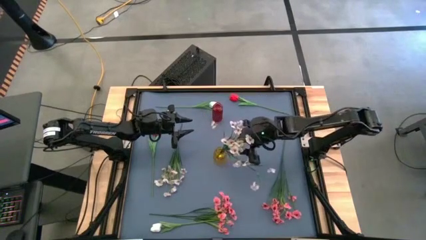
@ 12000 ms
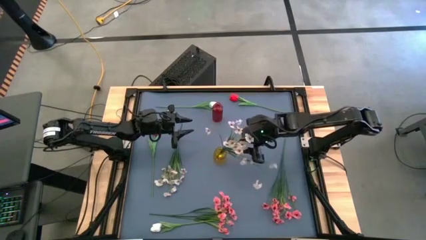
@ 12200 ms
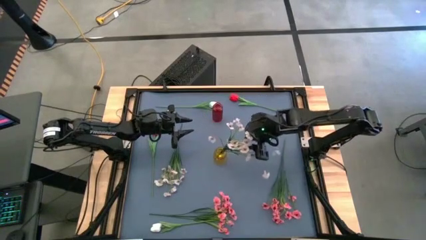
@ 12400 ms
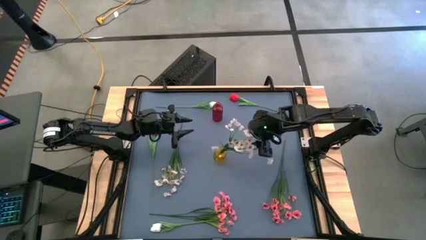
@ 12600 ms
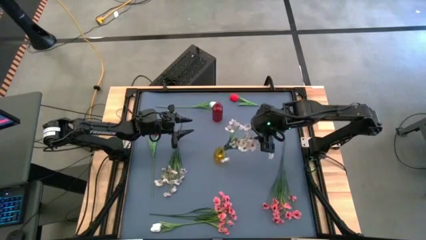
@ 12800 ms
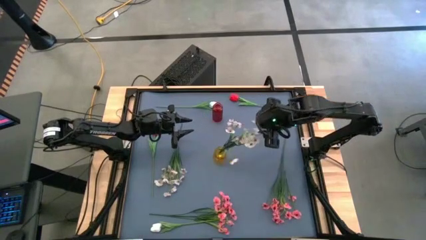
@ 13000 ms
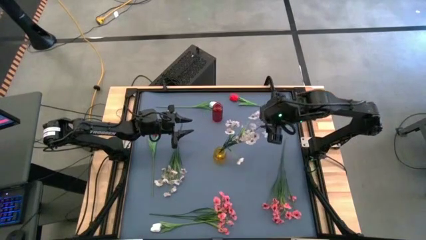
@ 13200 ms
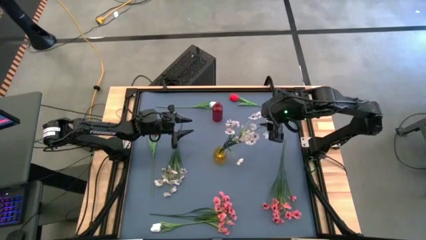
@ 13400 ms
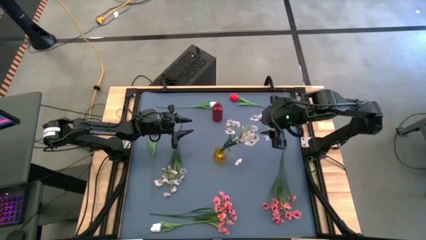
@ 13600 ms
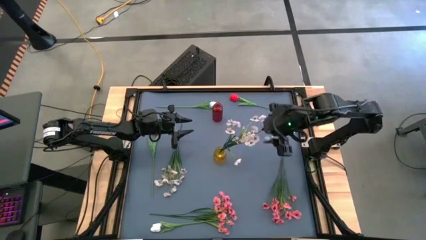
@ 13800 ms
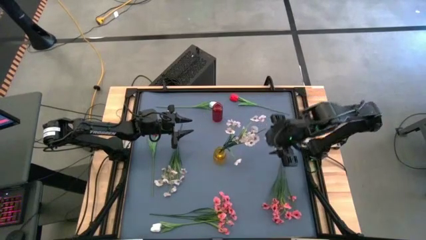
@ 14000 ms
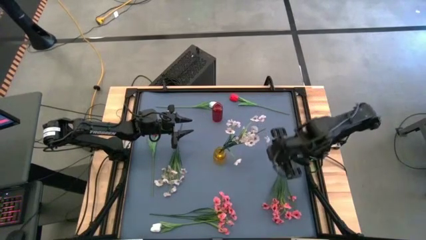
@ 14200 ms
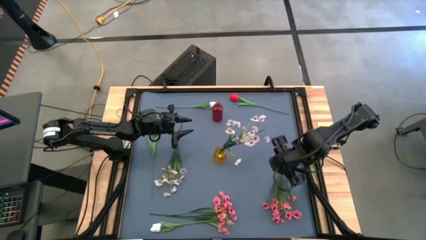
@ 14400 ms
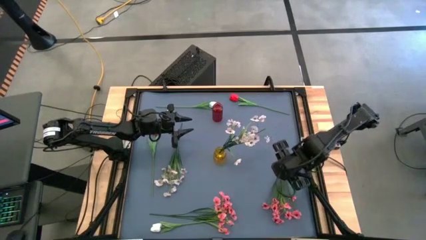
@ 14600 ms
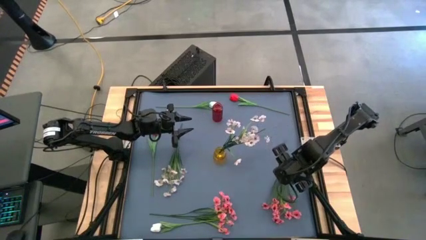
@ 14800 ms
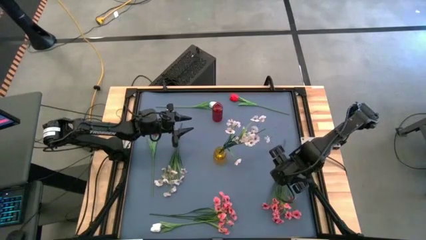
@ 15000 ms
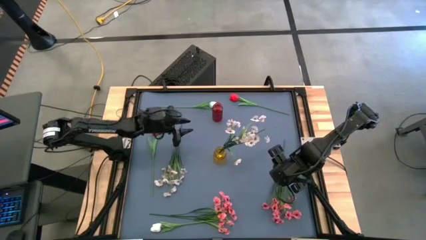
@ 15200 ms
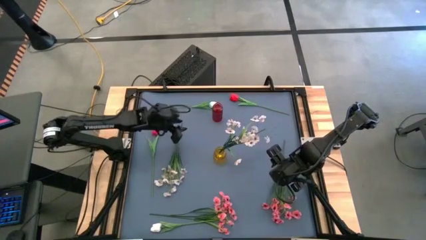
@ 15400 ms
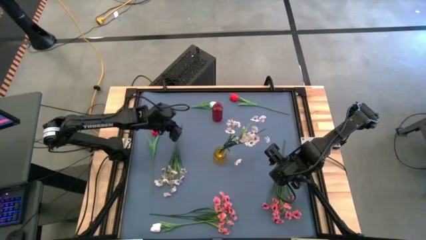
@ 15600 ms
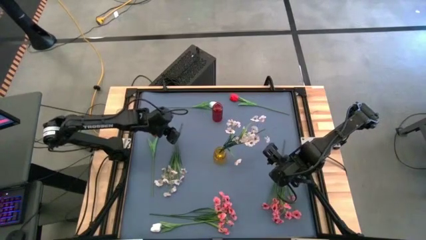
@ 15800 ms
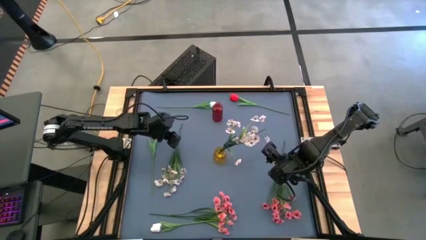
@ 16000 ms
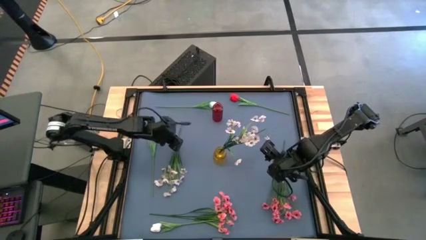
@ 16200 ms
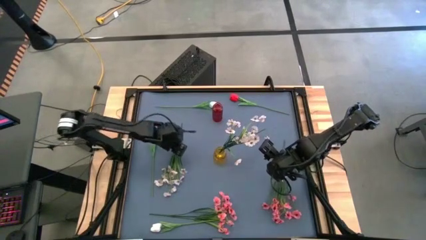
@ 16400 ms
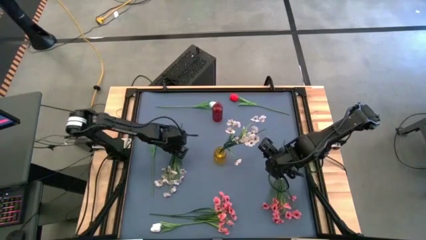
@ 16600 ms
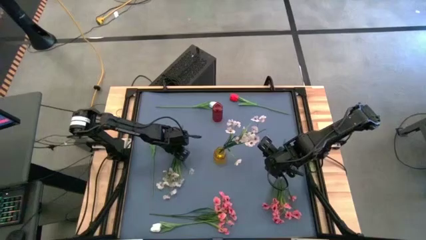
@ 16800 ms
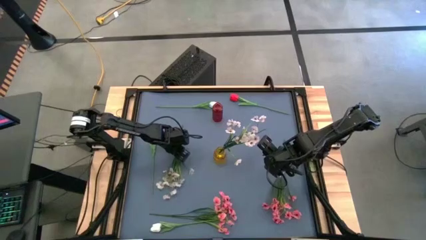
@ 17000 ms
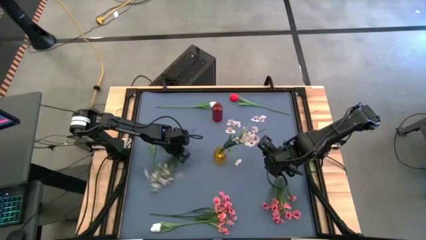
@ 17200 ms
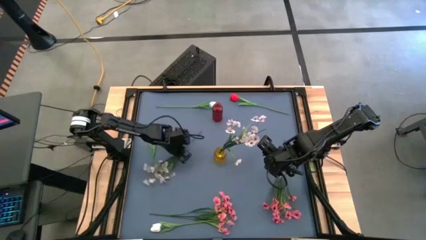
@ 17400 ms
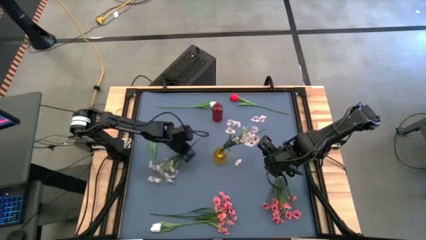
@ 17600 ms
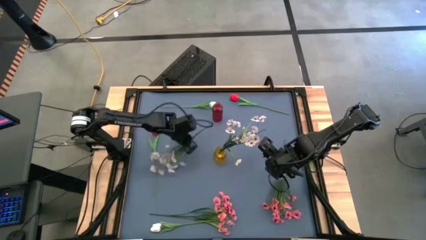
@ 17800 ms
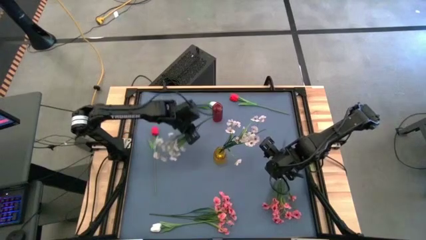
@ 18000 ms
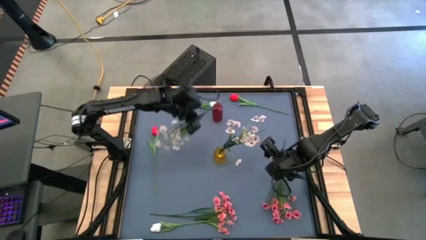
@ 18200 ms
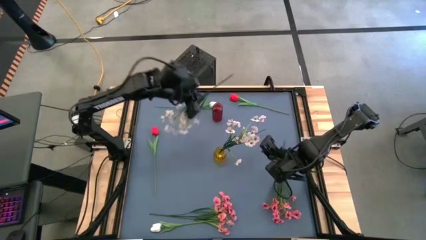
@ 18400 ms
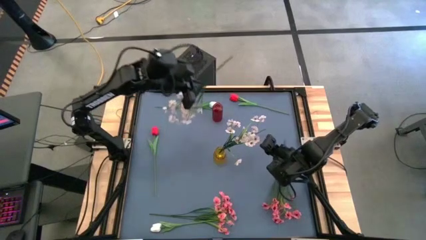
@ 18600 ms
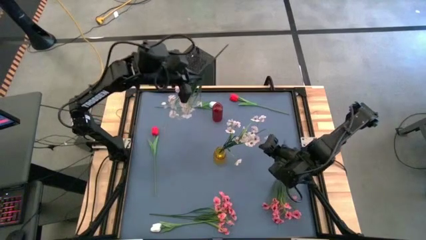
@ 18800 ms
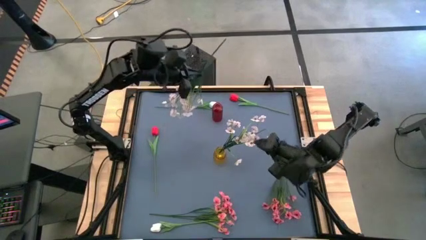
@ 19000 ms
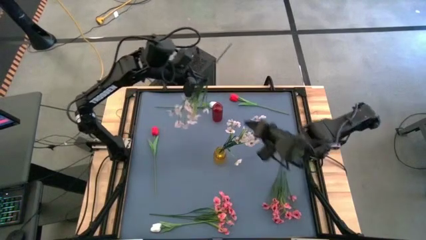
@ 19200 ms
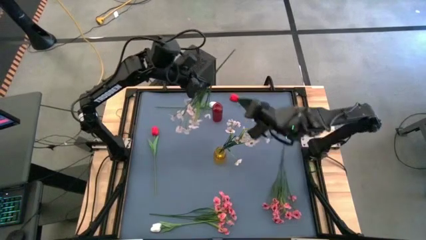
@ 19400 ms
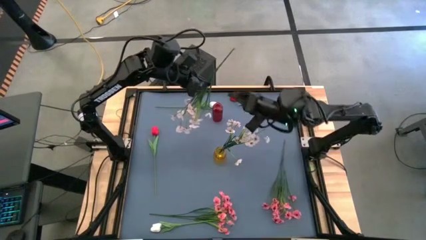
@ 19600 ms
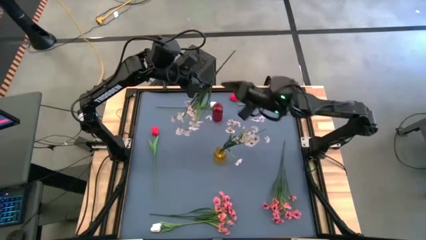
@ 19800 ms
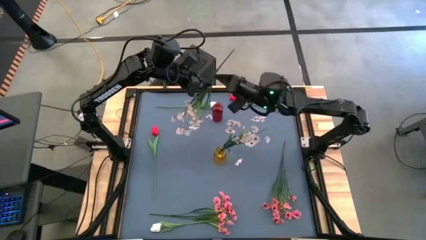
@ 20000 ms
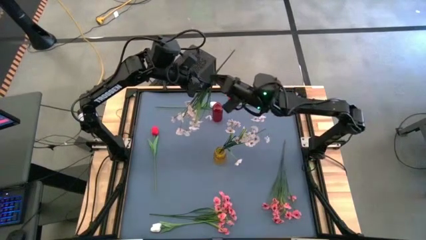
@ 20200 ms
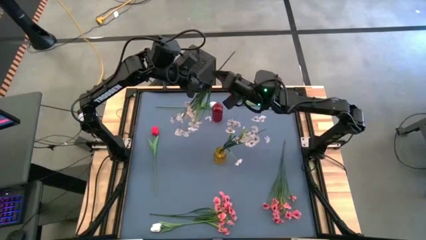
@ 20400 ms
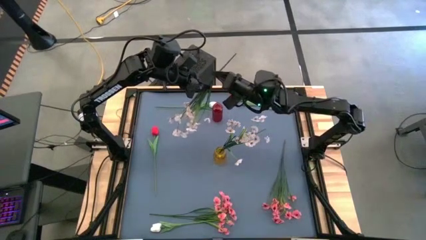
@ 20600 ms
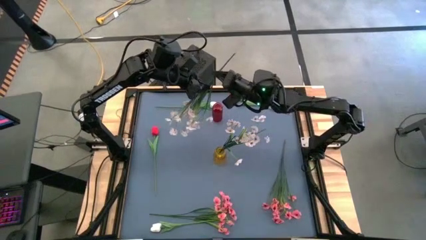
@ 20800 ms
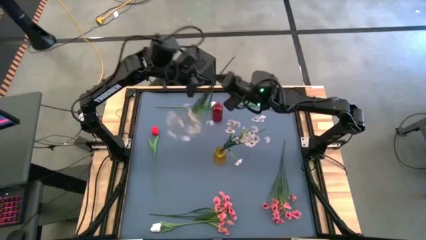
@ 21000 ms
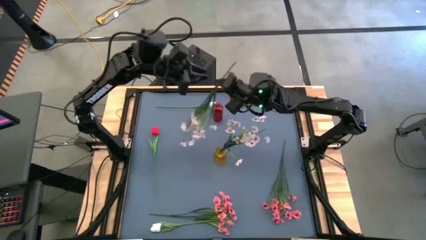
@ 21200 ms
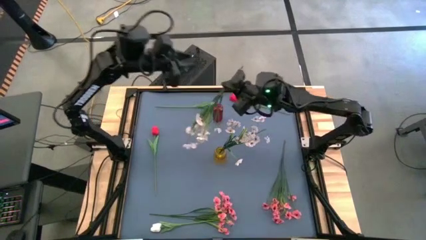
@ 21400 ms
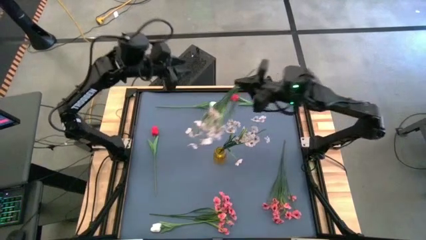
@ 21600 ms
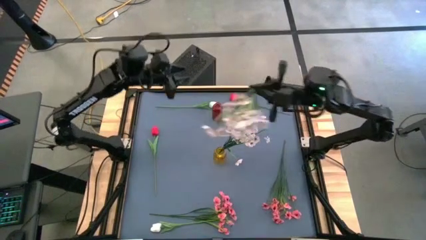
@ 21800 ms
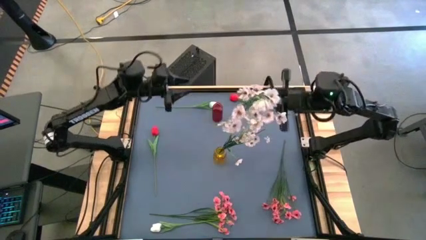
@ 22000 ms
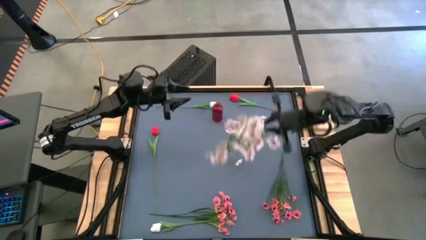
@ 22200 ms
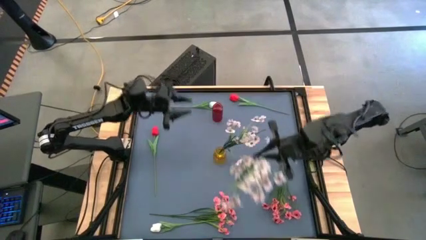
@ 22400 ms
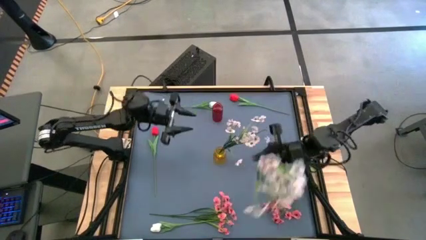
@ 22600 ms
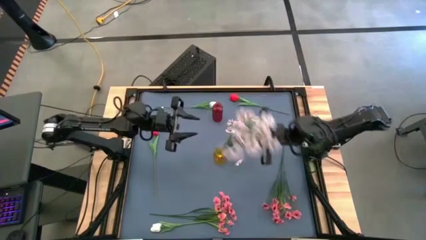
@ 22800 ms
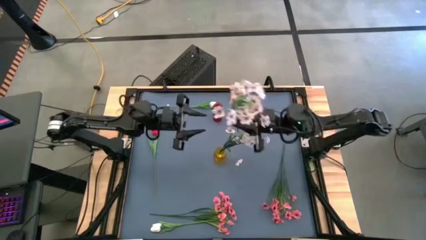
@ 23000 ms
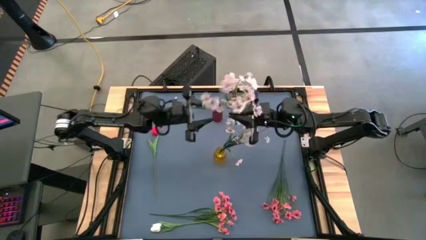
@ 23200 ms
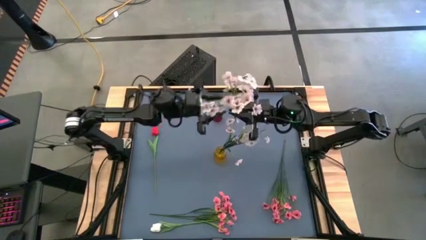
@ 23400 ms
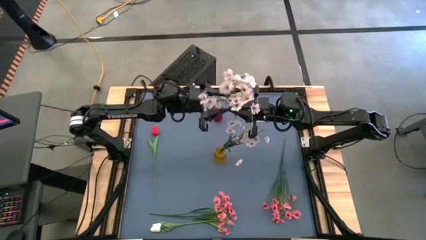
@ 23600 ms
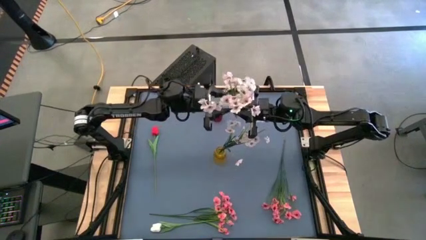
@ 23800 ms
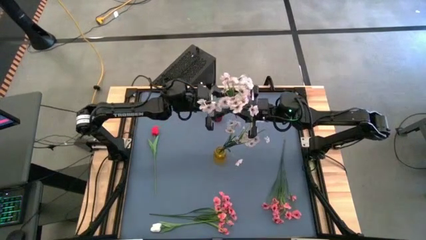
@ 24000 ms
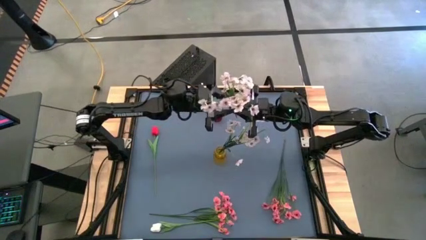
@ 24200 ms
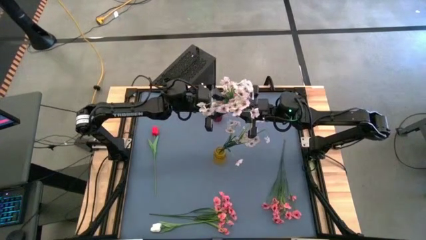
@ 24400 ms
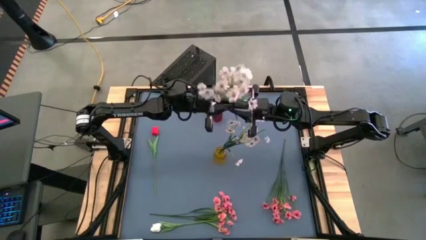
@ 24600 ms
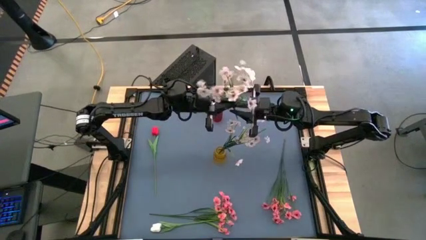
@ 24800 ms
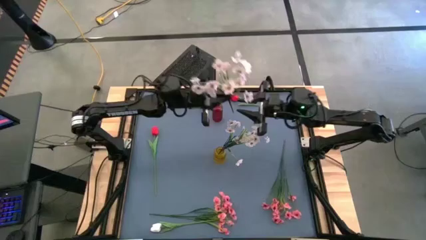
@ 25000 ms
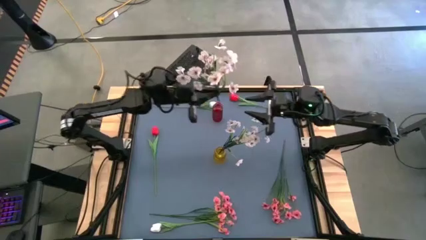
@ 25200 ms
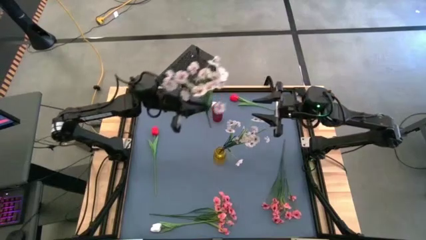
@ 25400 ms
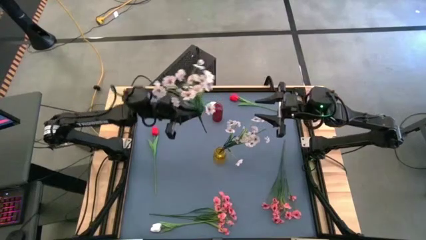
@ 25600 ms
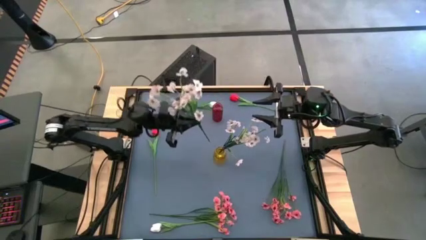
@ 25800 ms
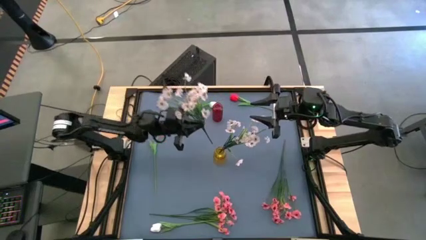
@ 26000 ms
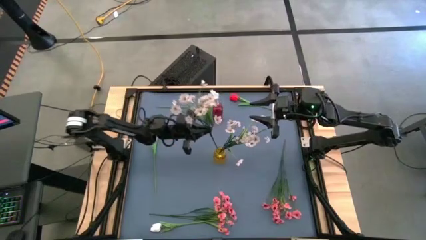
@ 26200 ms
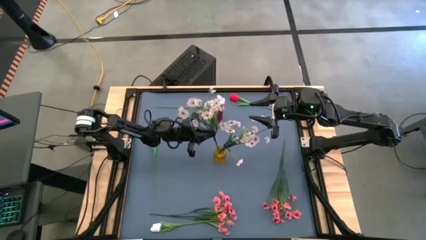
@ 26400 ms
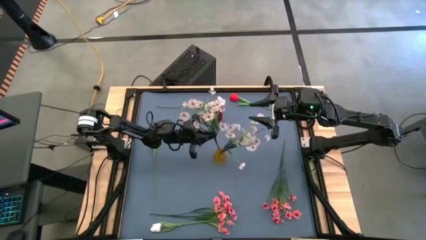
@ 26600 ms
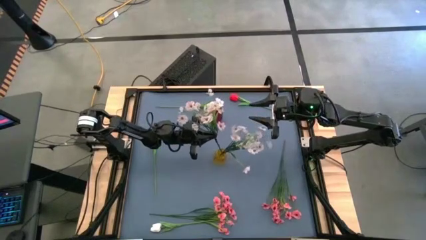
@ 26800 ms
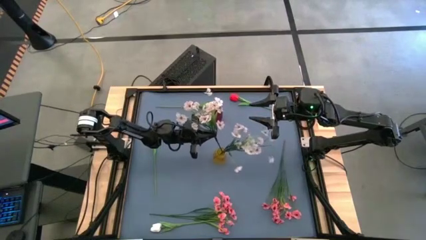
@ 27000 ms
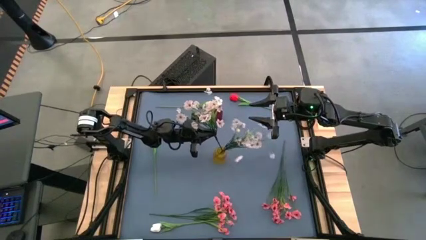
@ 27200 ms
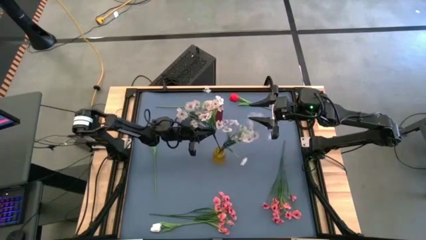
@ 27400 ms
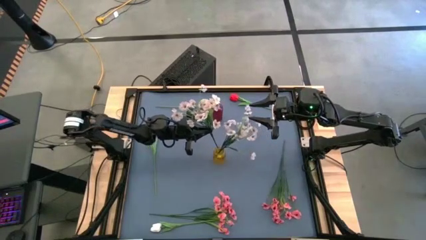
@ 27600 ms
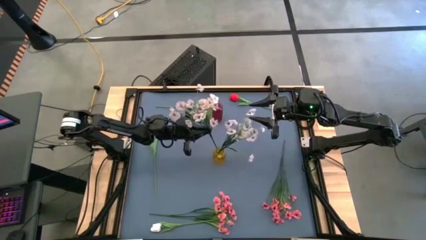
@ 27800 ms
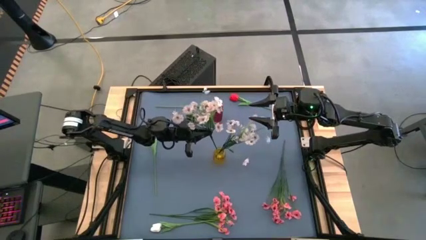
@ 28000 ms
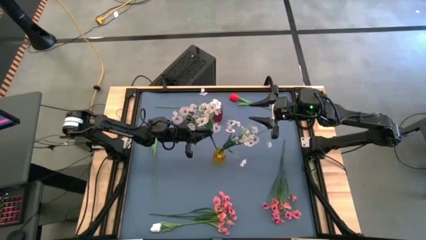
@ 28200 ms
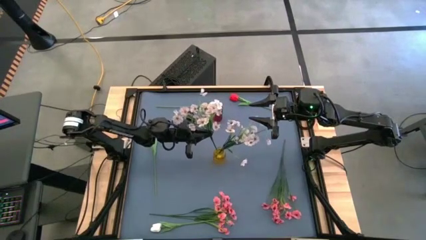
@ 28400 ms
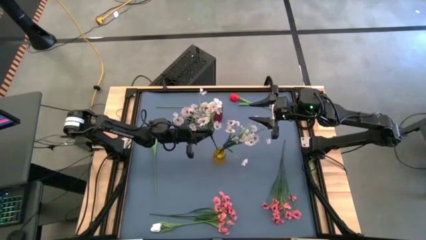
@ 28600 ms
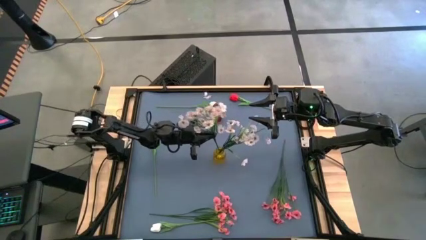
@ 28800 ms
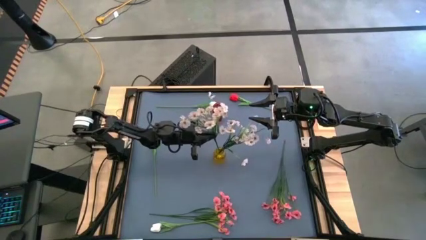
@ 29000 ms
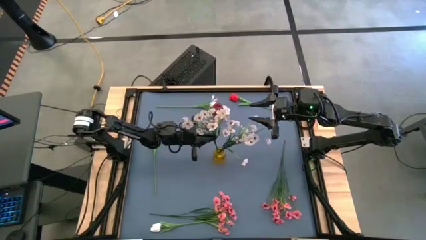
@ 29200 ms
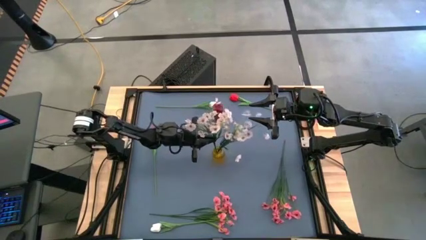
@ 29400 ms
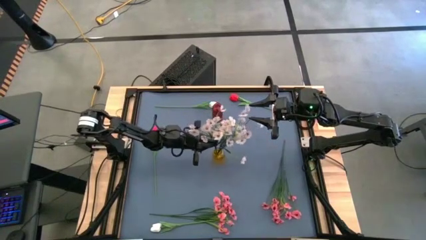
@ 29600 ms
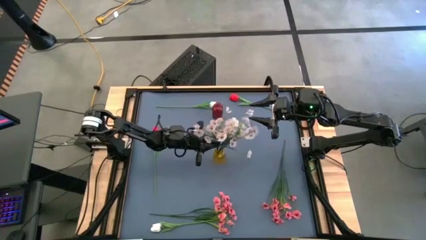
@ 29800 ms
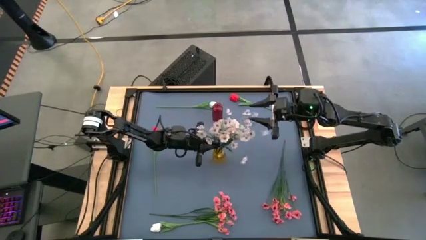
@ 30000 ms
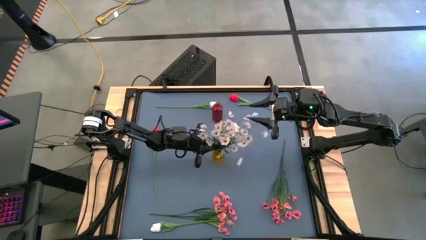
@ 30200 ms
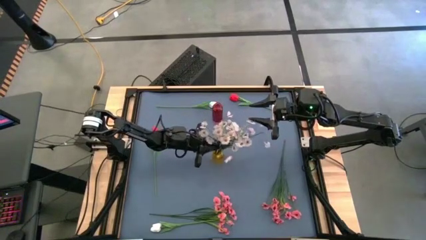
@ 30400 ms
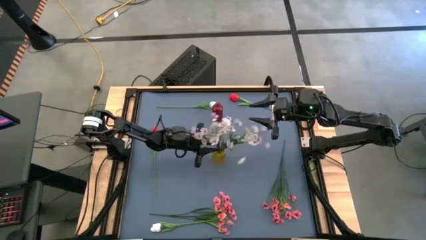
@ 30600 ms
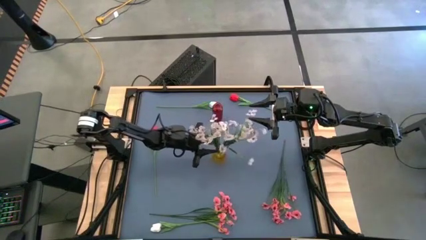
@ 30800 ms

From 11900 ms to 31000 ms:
Task: Sort flowers into vase by color
Put the white flowers into the yellow flower vase
